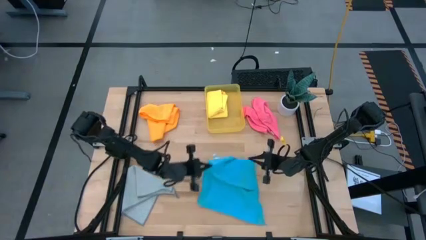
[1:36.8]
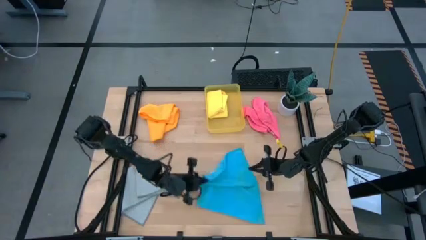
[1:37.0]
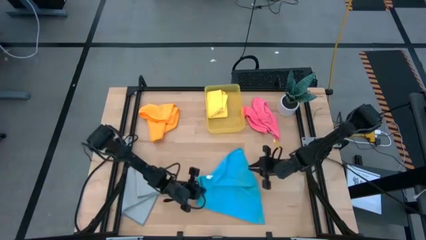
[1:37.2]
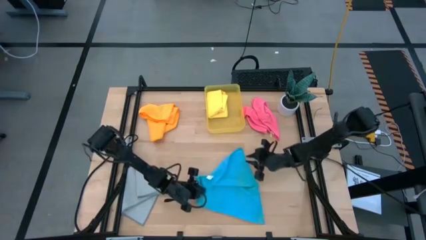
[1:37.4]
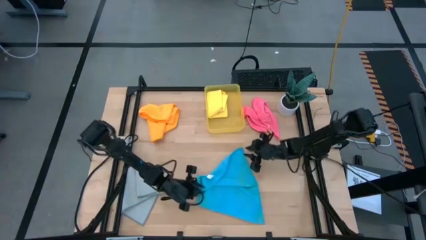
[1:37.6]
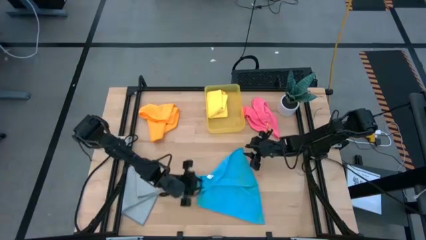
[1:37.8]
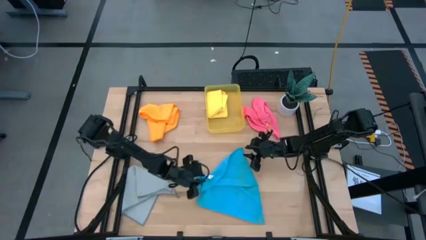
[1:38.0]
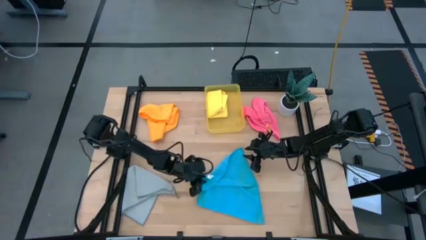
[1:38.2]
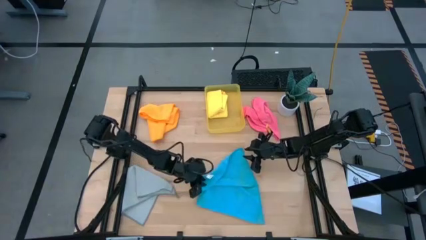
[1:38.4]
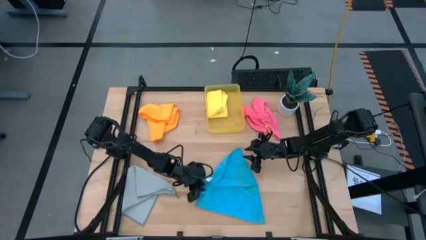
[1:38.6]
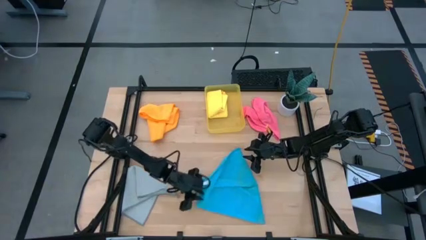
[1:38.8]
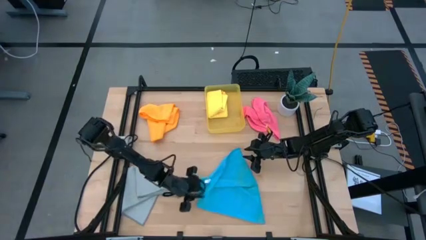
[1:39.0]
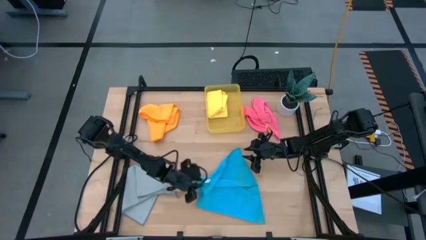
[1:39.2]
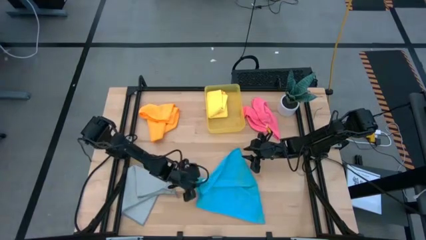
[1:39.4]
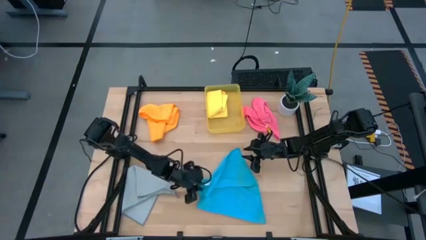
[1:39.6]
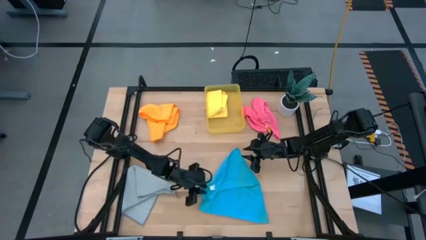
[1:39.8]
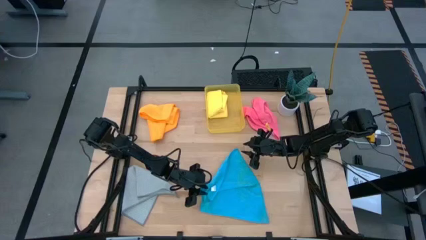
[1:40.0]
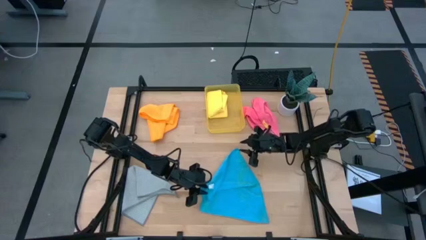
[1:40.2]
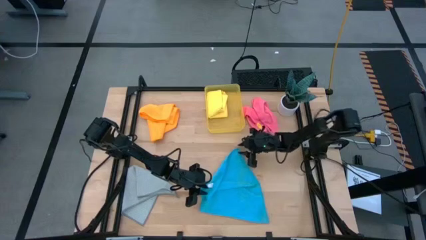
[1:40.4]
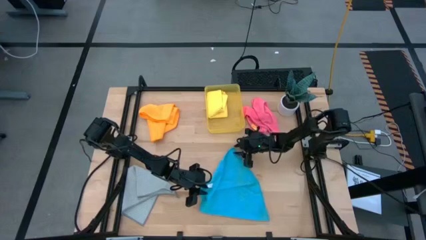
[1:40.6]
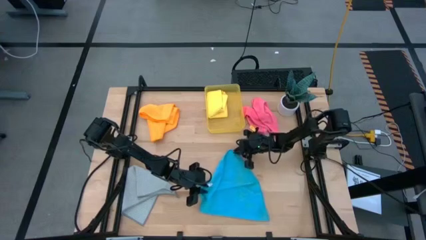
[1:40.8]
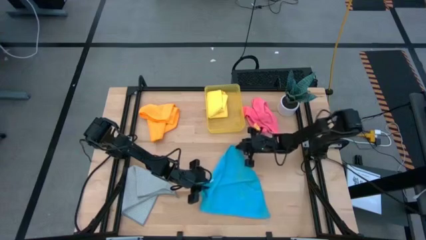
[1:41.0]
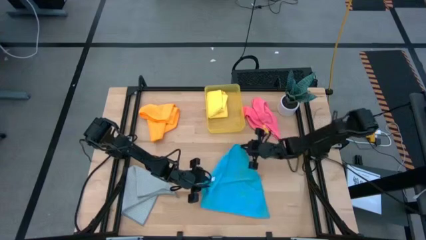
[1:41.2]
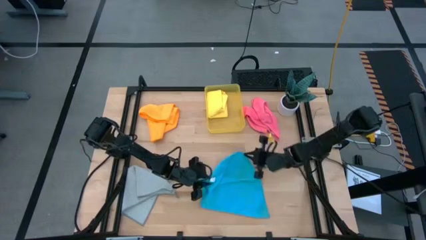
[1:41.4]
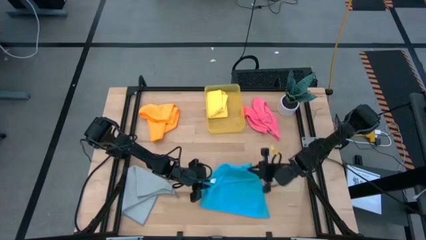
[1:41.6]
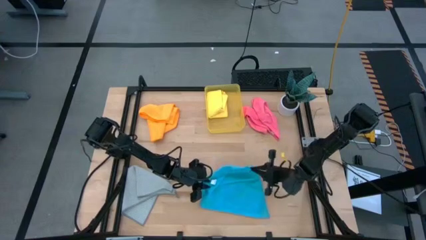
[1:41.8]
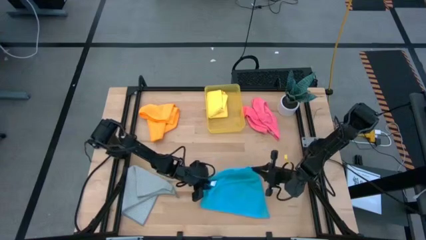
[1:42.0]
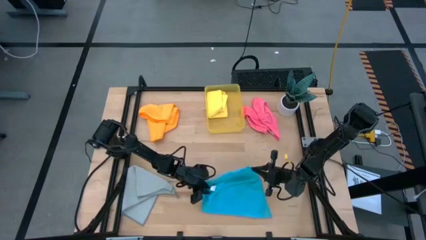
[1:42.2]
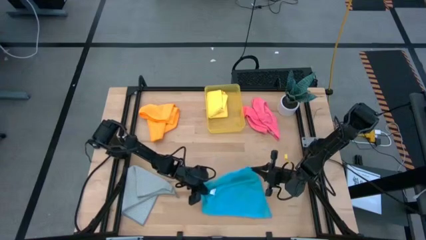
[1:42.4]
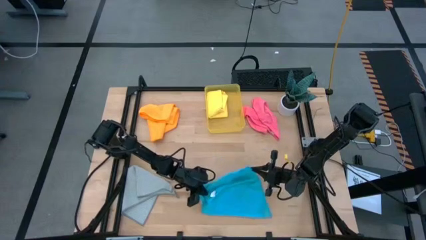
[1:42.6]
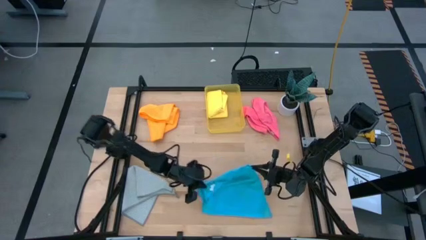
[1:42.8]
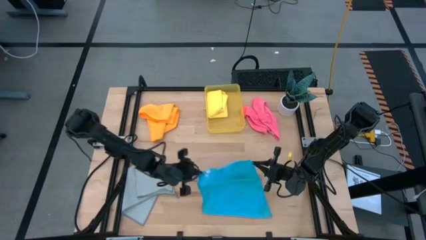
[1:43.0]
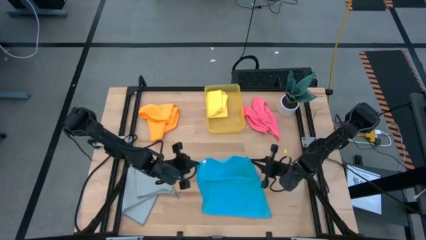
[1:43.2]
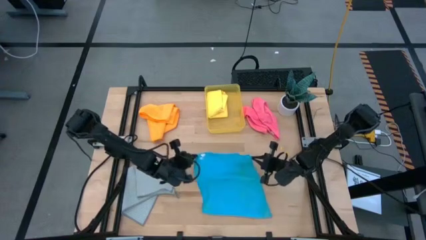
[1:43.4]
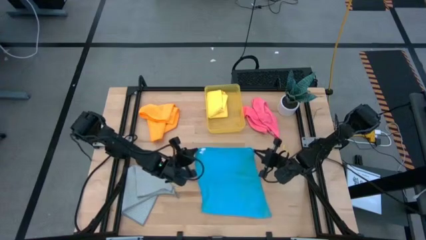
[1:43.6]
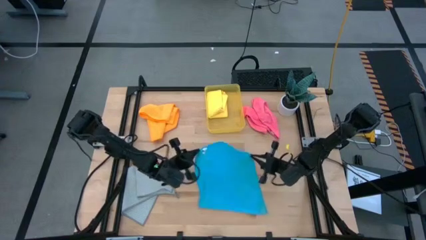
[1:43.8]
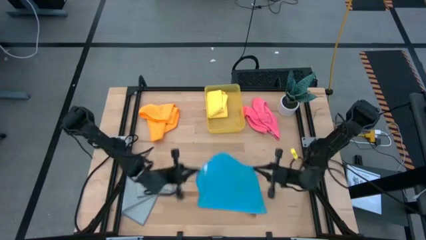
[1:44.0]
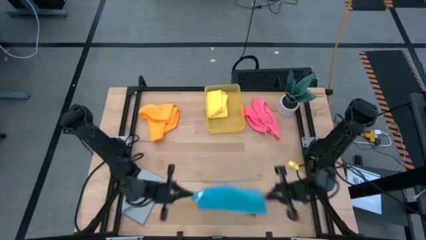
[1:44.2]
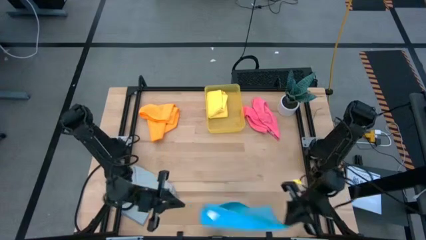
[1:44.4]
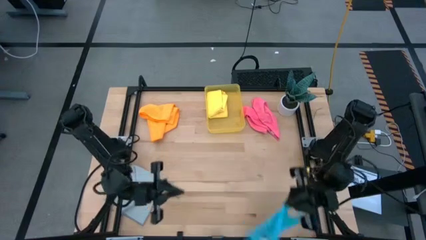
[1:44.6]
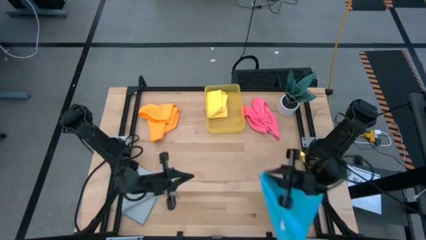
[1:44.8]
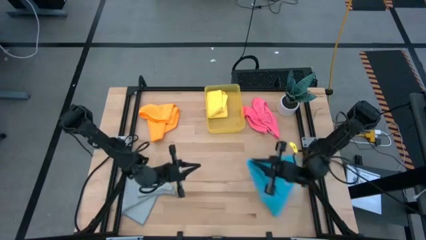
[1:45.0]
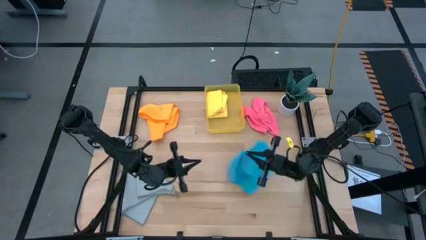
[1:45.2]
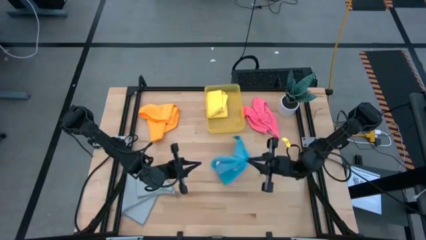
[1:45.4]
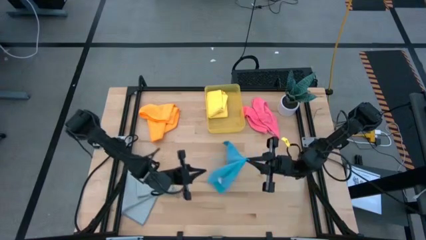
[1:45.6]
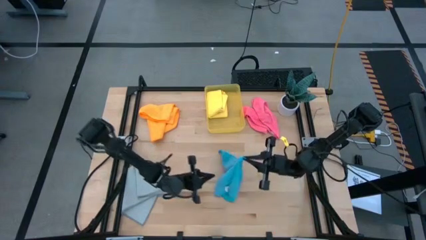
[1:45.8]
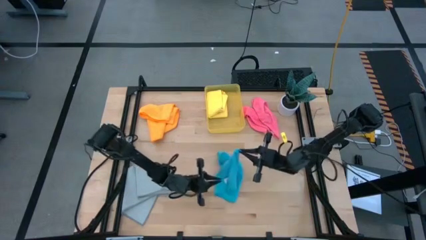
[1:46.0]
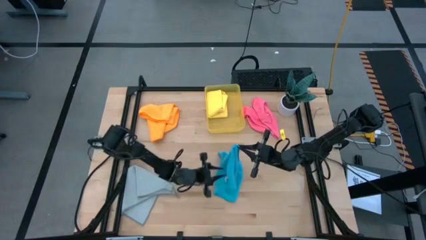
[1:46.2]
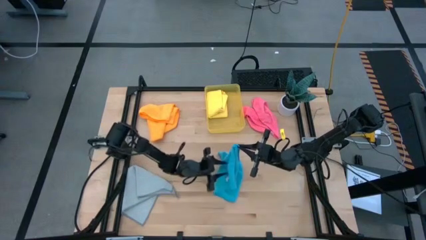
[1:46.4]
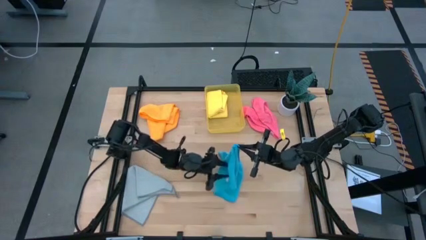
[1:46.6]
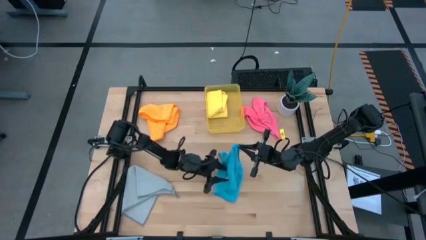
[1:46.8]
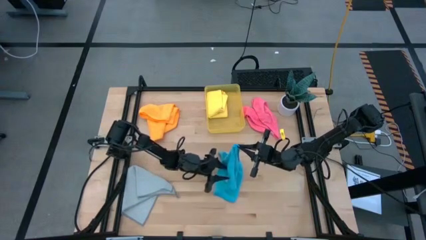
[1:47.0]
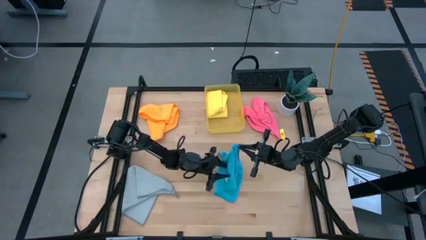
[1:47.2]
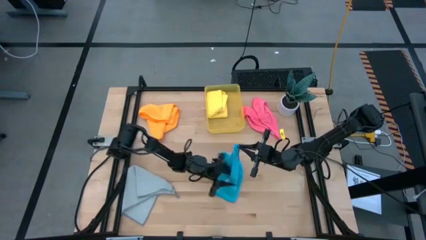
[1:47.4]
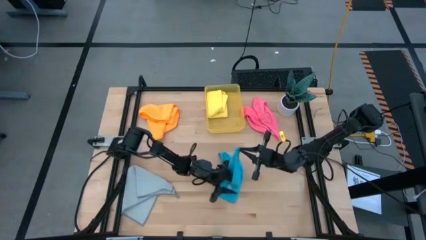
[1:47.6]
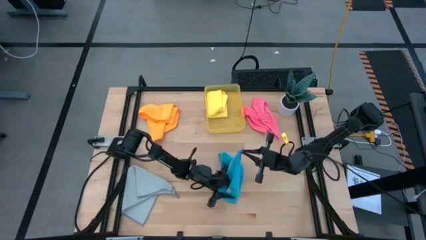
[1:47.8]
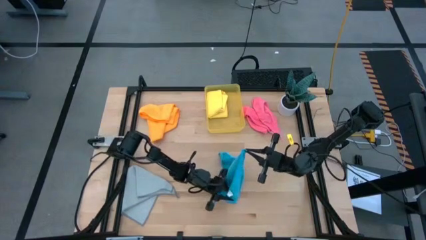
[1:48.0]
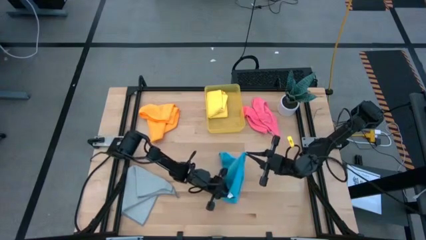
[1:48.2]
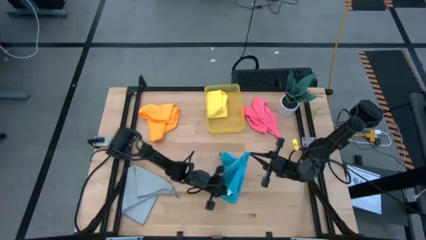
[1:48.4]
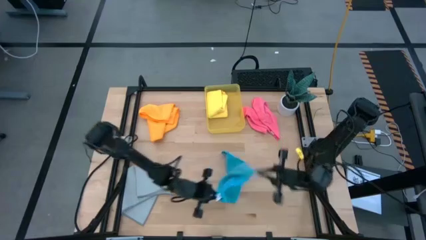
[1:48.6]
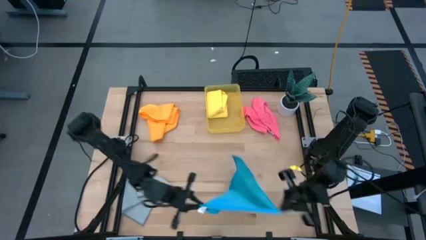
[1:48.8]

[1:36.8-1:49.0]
Task: Fold microfiber towels
Fold the blue microfiber towel

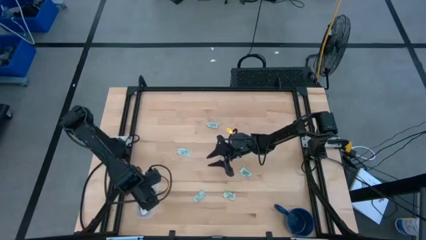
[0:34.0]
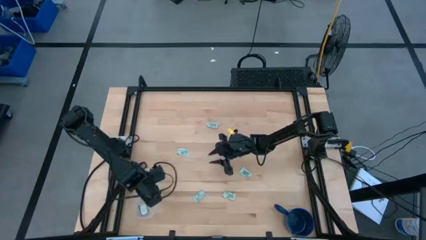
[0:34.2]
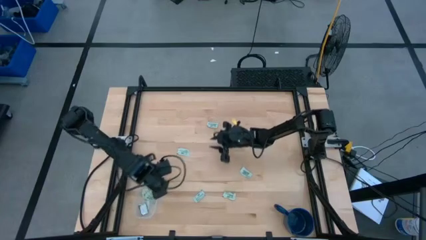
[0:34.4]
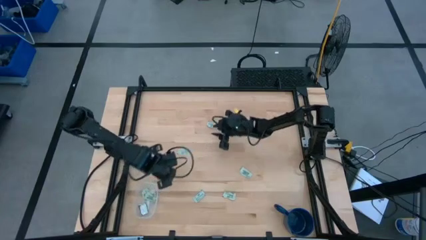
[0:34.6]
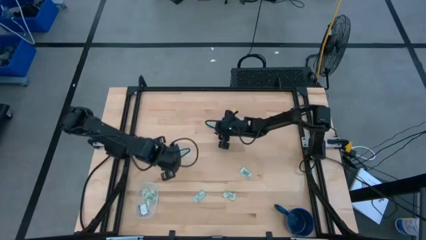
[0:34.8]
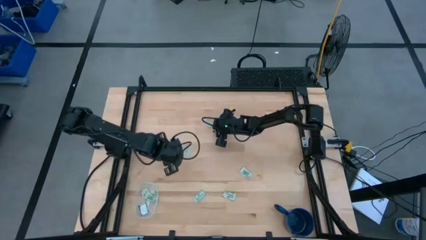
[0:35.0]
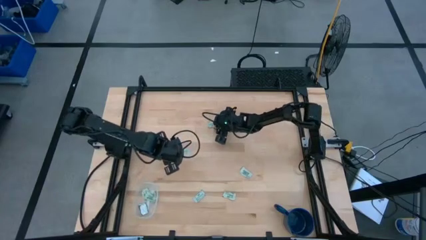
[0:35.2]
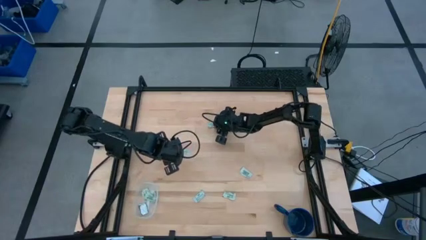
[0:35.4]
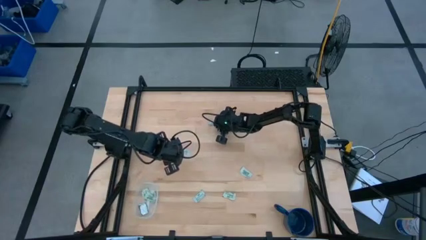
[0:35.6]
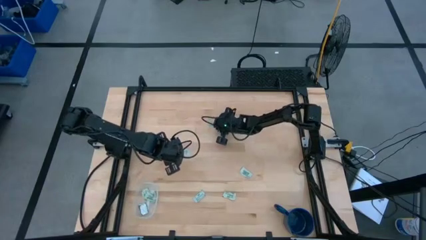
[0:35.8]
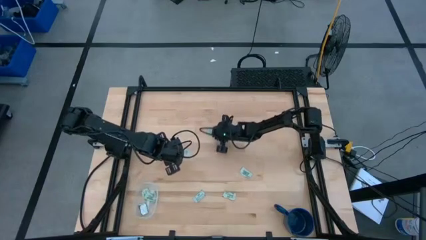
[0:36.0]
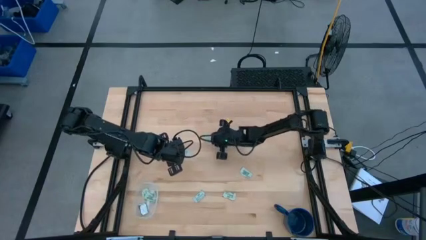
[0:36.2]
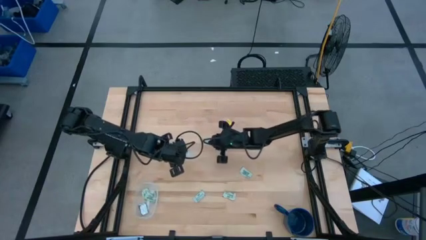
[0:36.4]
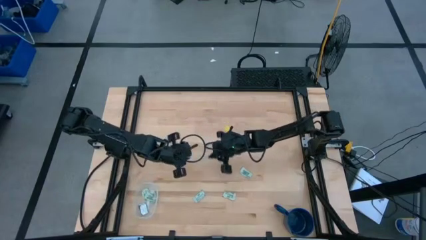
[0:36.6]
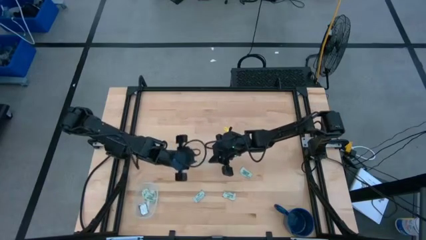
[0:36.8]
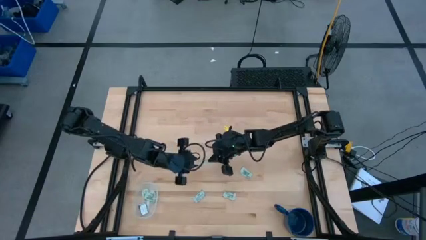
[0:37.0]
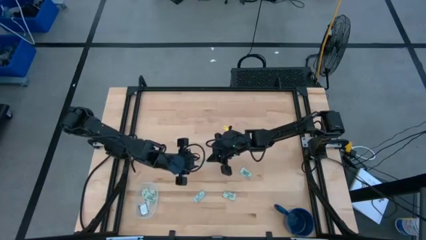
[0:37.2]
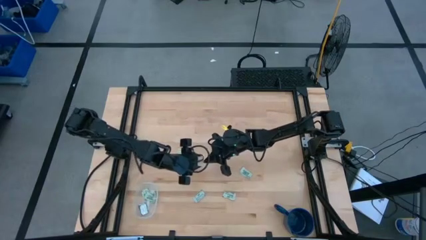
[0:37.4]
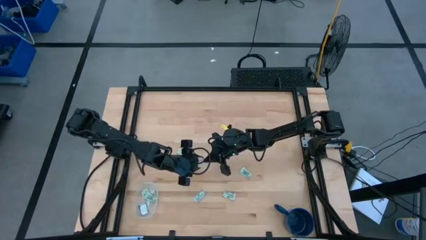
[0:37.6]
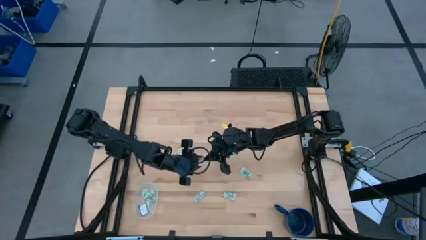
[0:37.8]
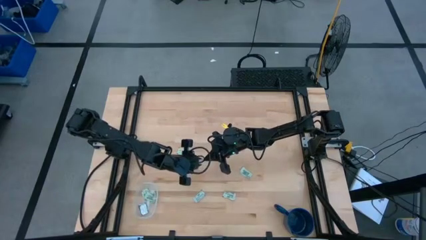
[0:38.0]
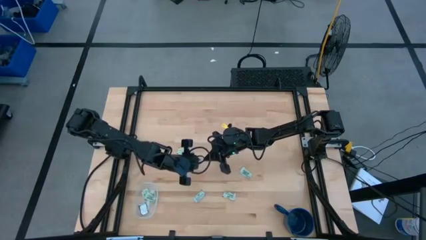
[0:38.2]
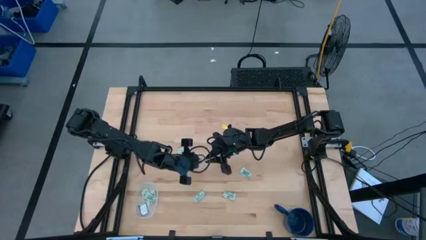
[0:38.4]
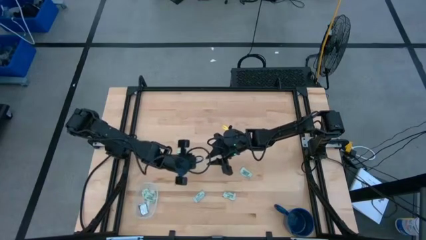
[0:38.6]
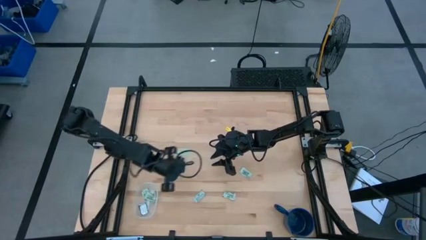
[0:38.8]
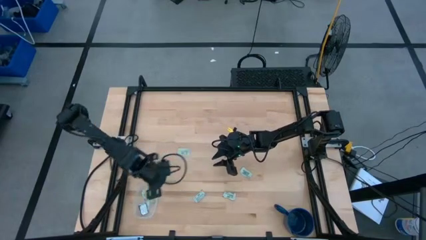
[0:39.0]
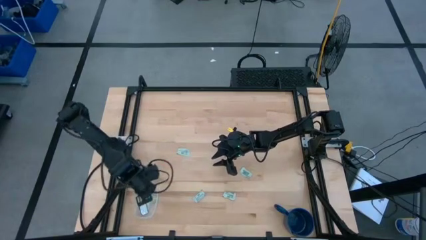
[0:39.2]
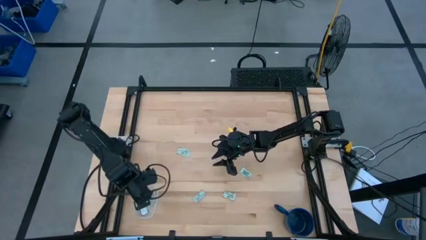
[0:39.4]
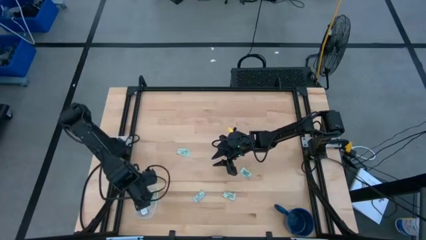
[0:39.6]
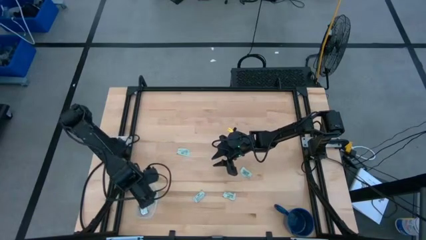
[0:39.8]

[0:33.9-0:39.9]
Task: Pick and place Stevia / Truvia into bins
Put the stevia packet into the transparent bin
